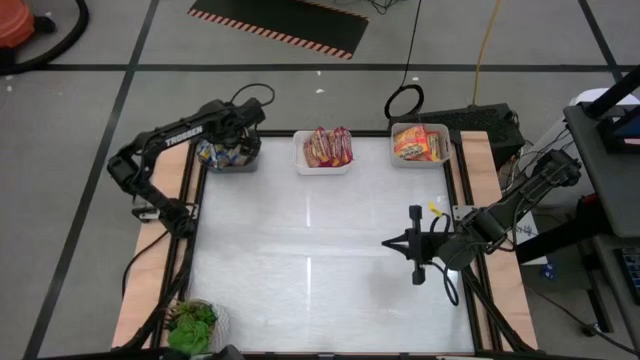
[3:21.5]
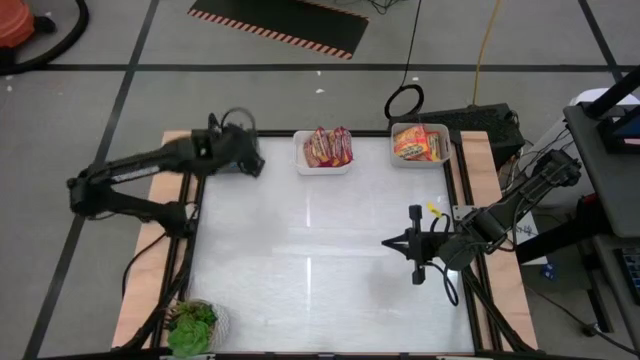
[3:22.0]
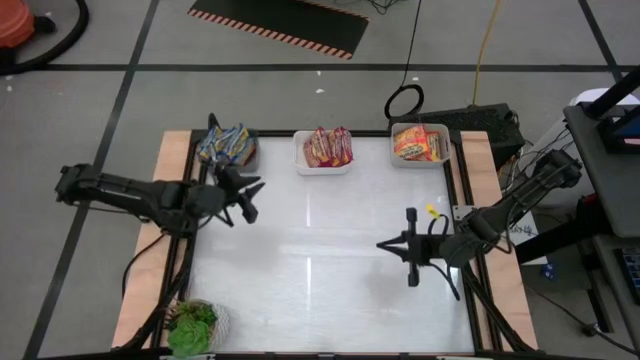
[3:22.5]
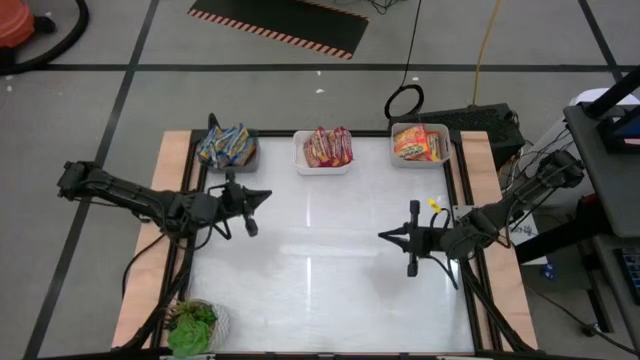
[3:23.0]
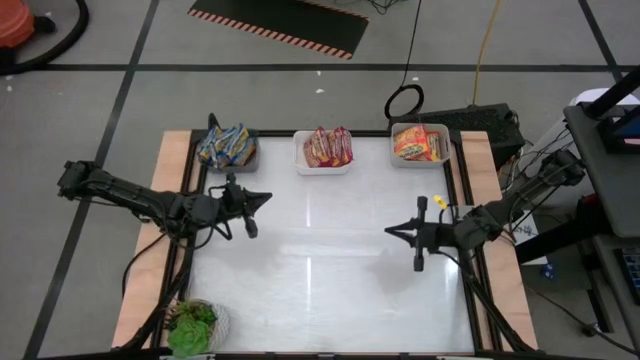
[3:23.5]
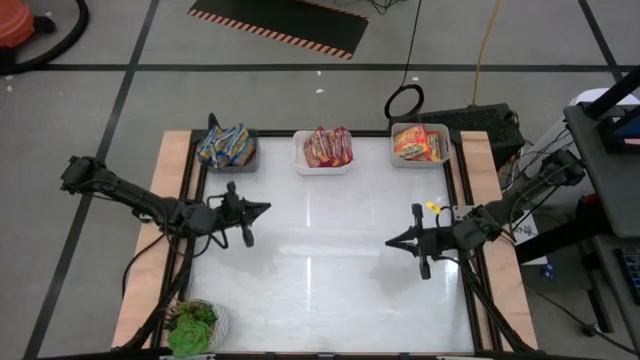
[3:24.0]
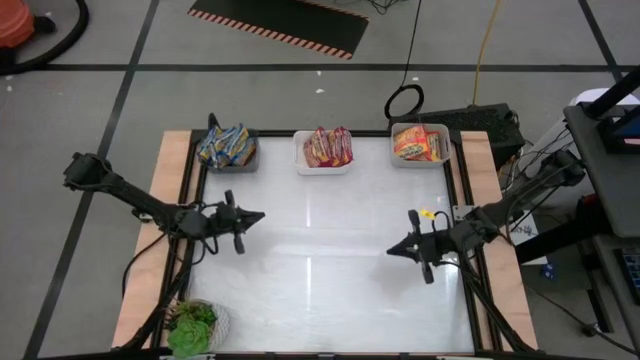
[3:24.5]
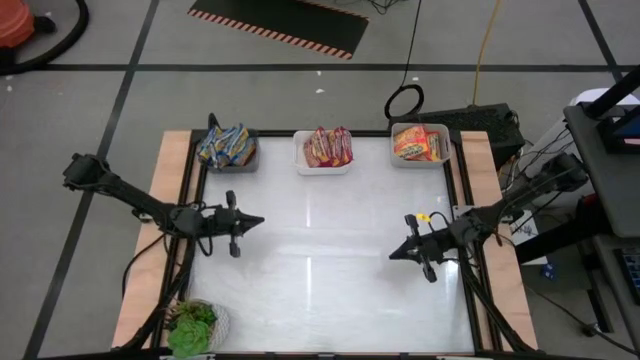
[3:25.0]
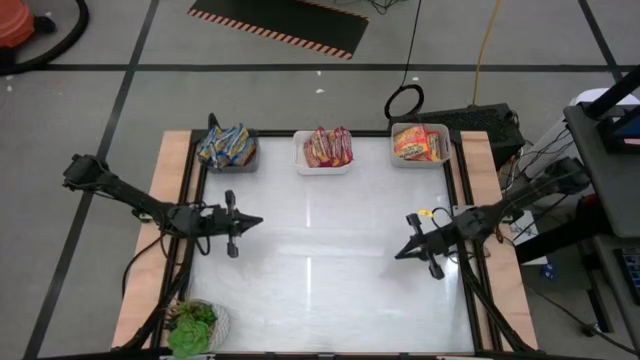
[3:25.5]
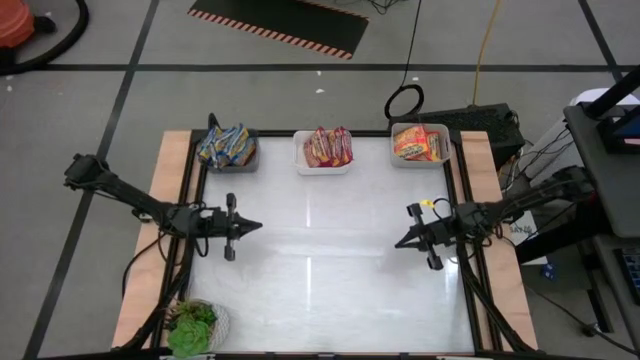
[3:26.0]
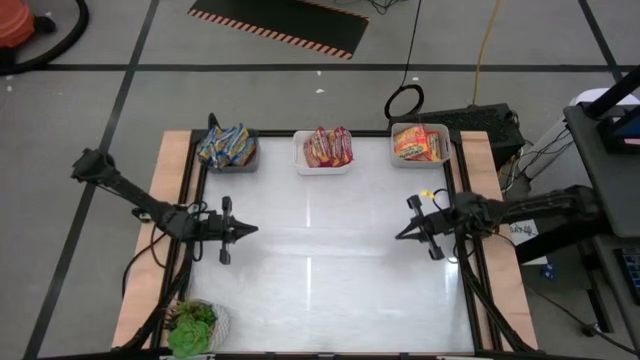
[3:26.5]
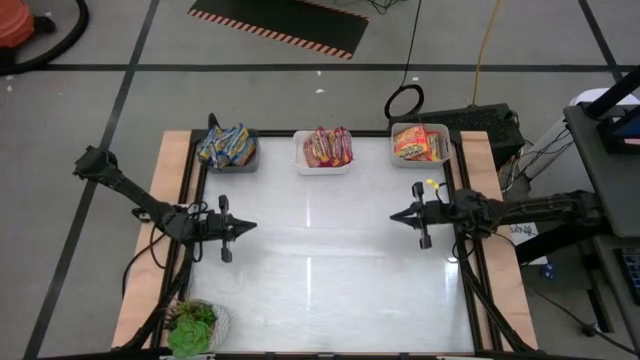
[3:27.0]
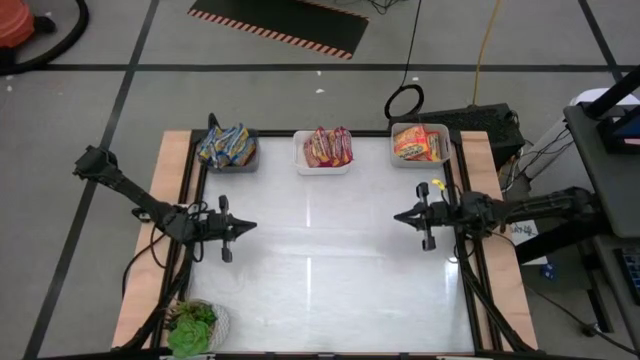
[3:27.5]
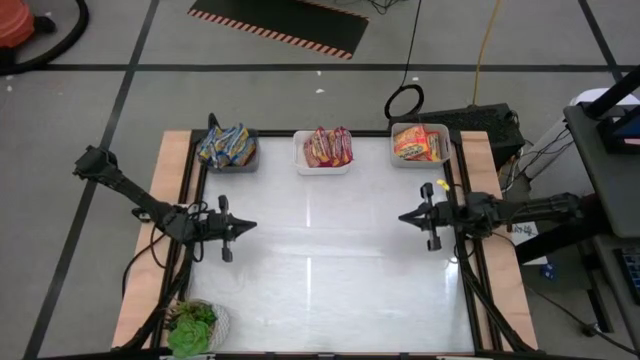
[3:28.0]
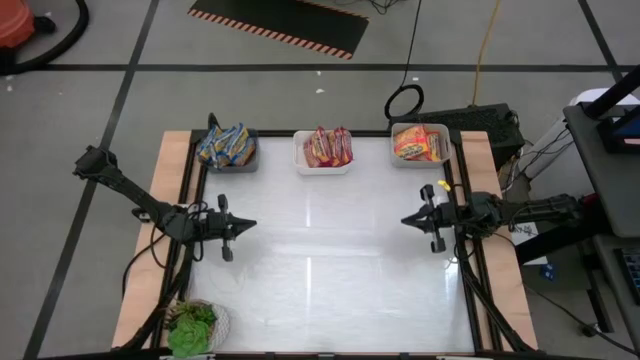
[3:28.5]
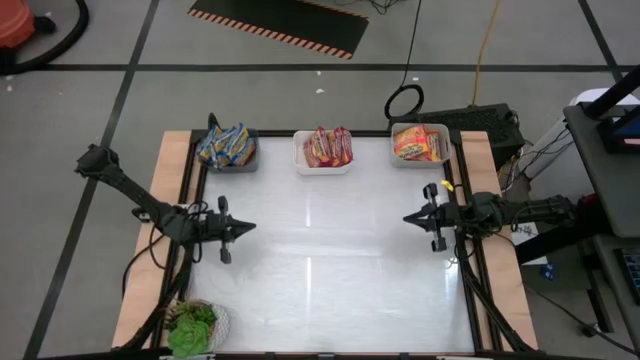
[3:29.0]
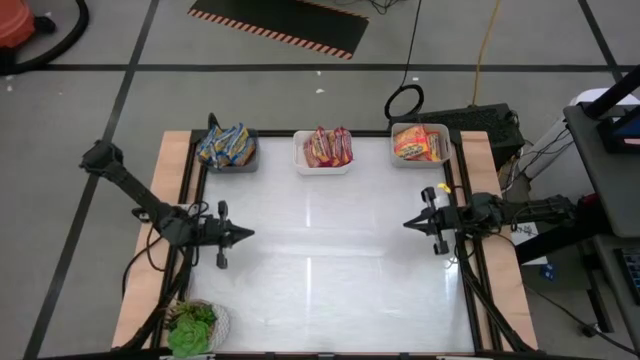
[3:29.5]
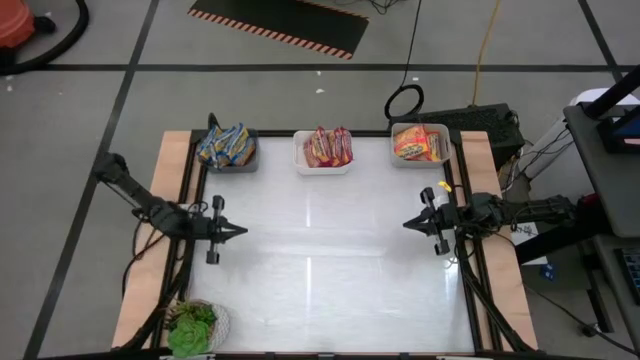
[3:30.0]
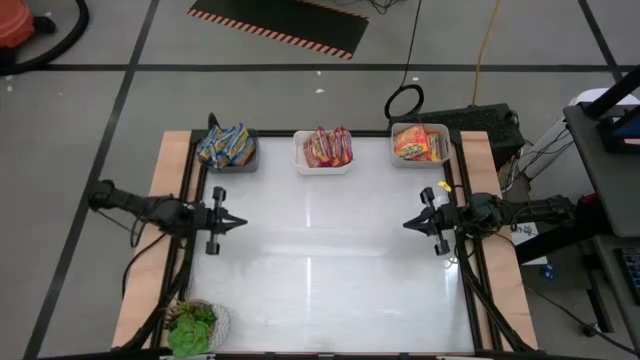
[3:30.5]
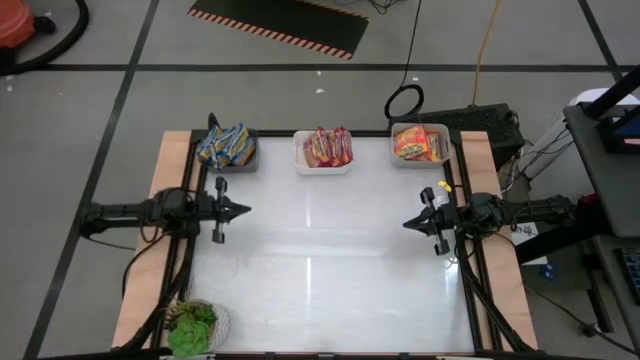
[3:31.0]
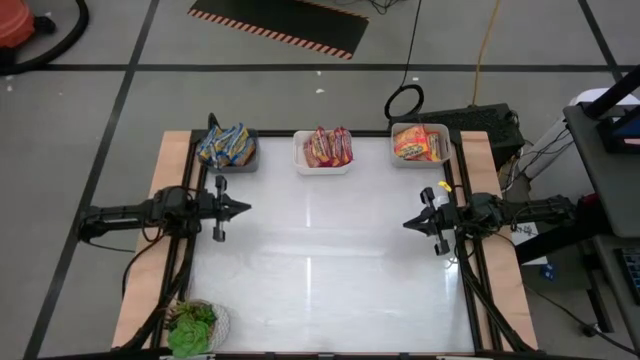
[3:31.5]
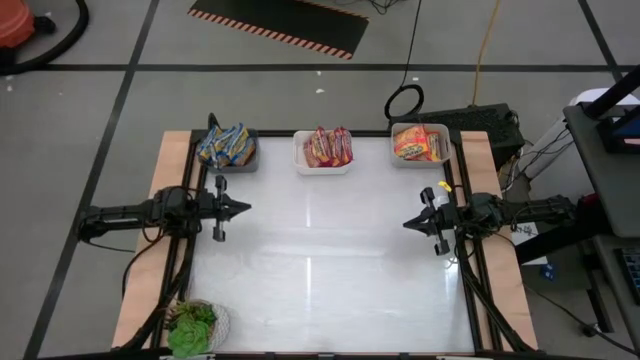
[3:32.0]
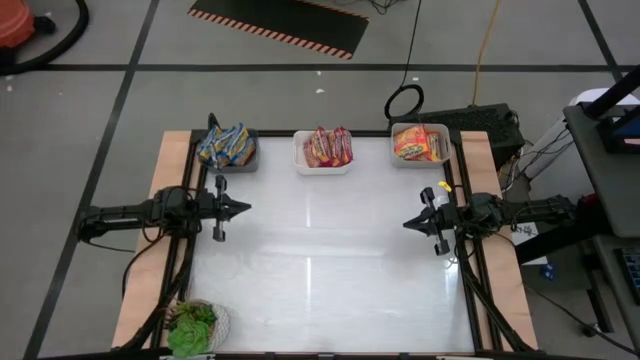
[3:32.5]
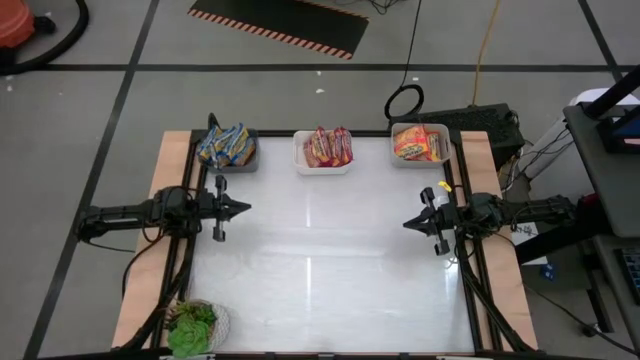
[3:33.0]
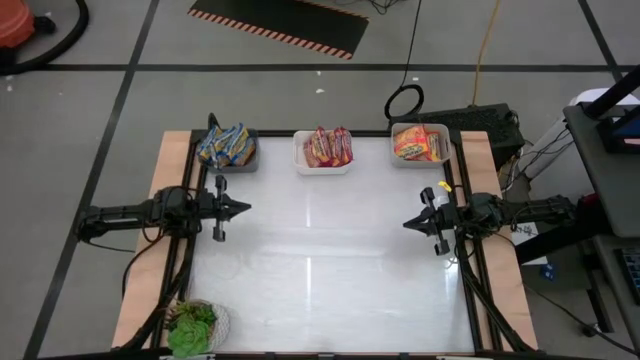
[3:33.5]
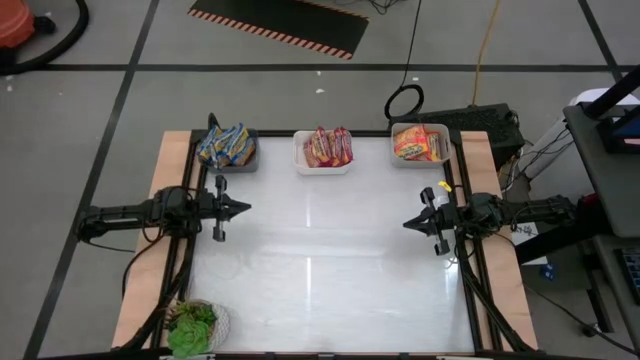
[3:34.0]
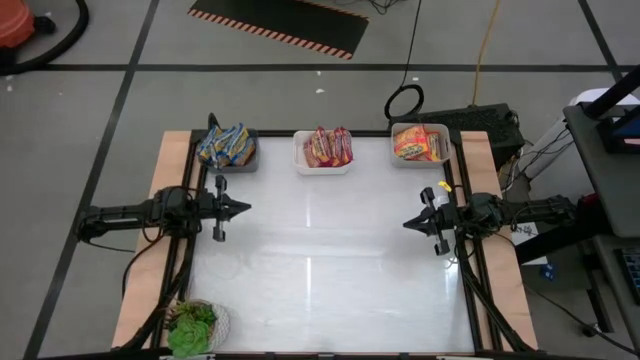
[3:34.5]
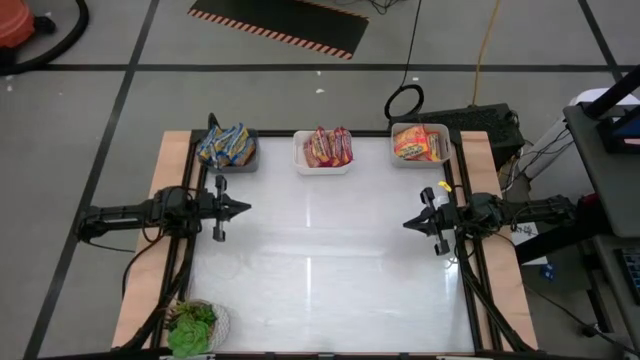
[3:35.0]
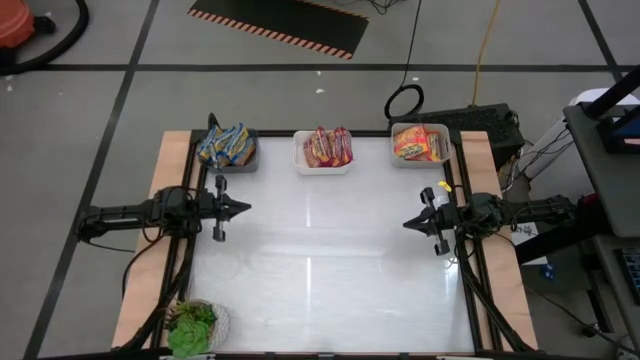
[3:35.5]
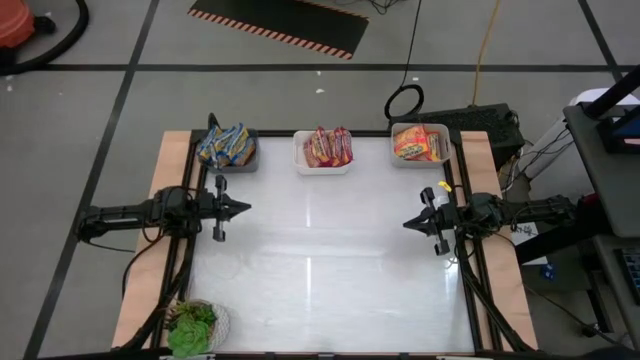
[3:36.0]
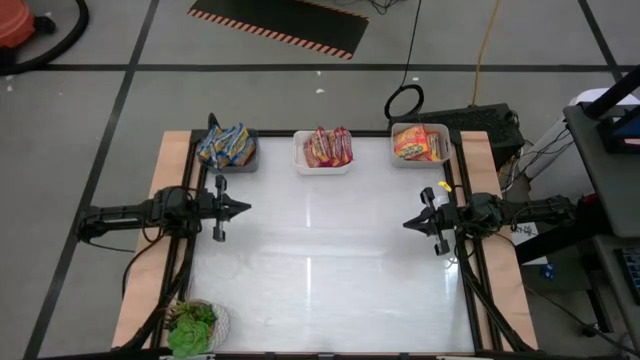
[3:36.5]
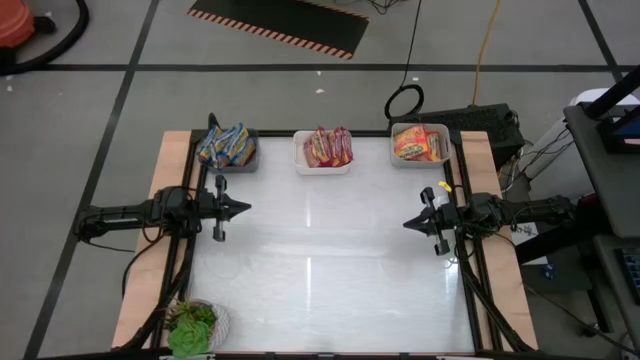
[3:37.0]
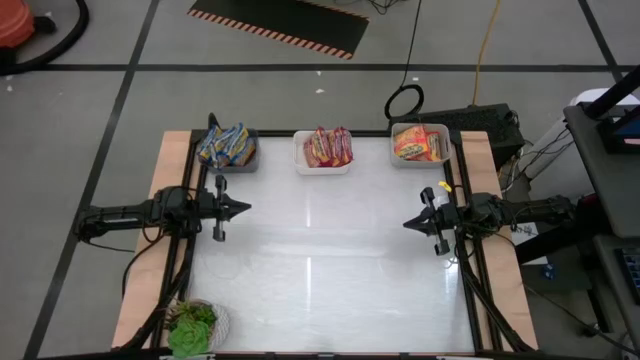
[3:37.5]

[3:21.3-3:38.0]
Task: Sort Maruchan noodles
Return to Home Position
